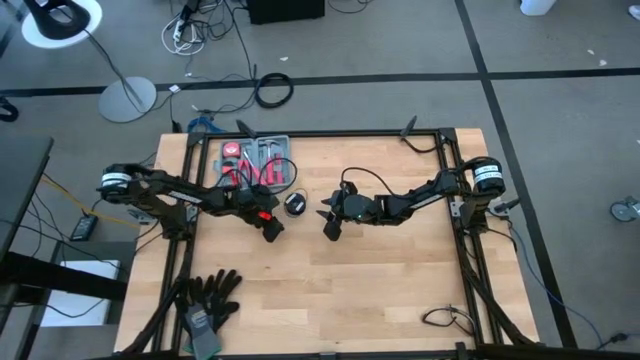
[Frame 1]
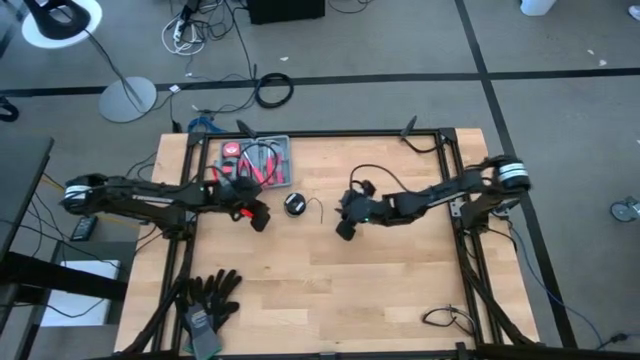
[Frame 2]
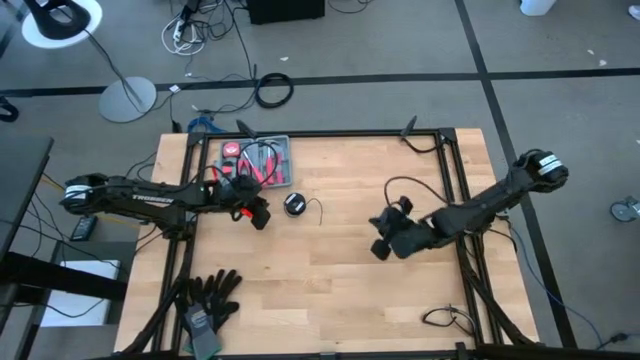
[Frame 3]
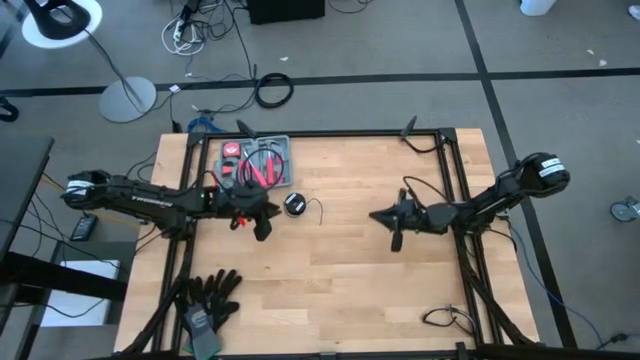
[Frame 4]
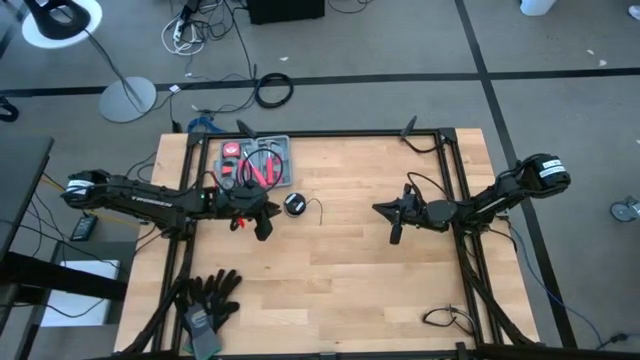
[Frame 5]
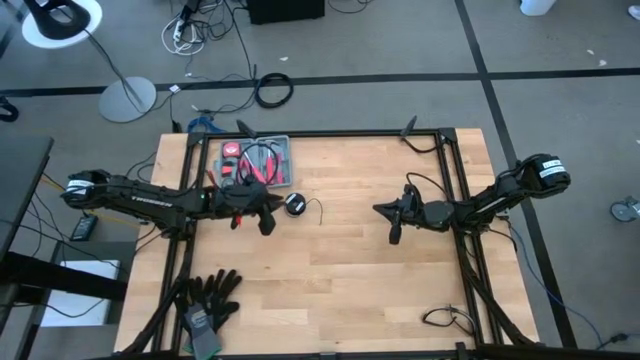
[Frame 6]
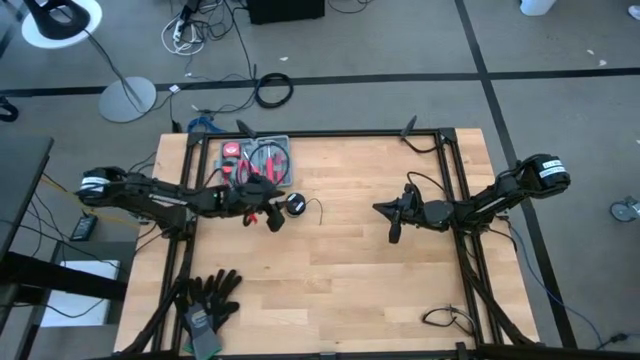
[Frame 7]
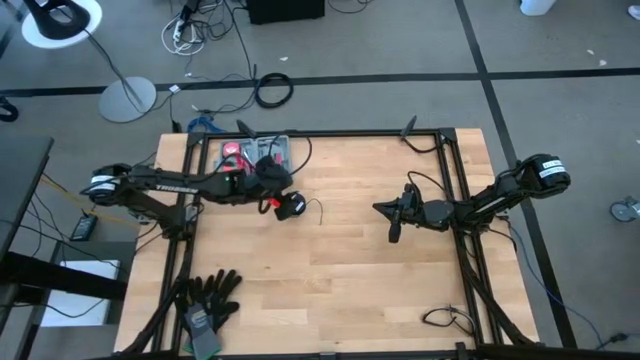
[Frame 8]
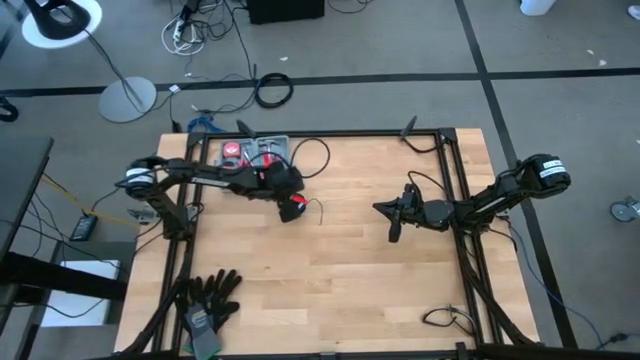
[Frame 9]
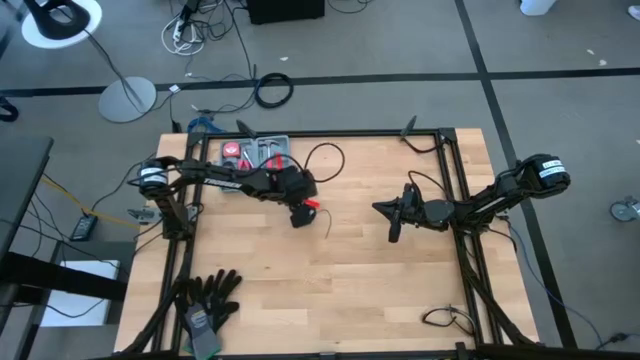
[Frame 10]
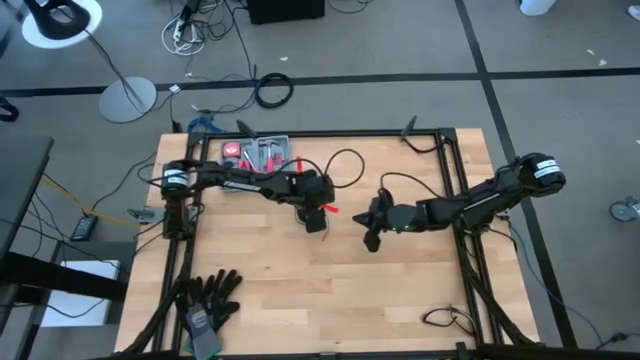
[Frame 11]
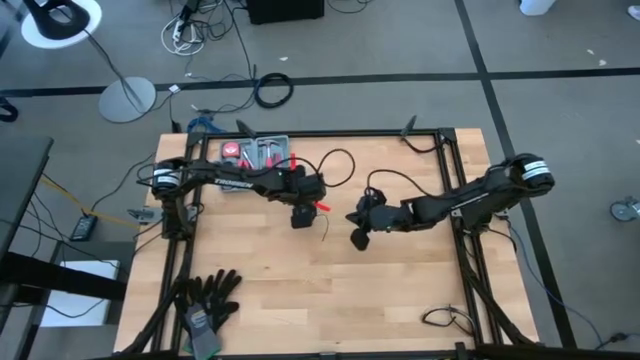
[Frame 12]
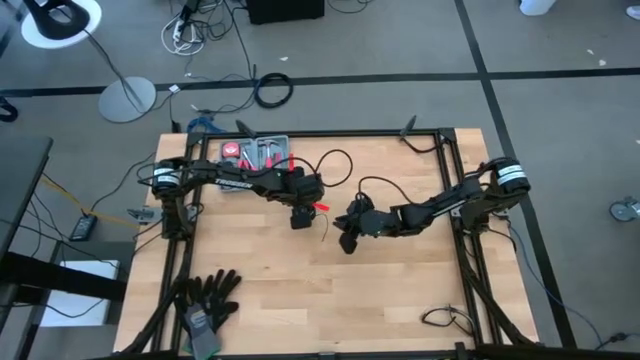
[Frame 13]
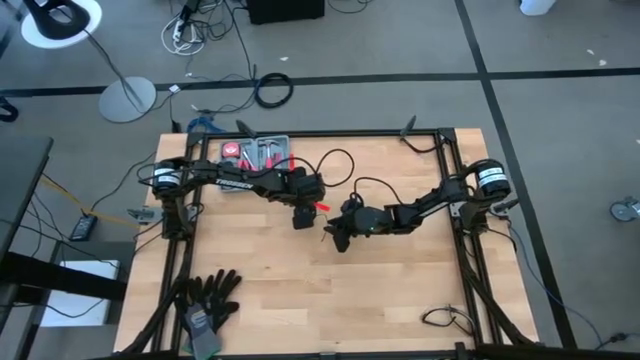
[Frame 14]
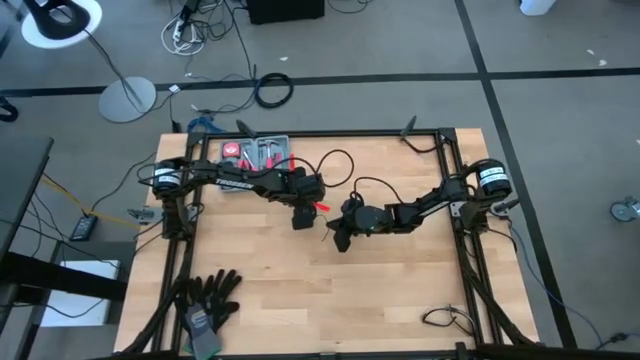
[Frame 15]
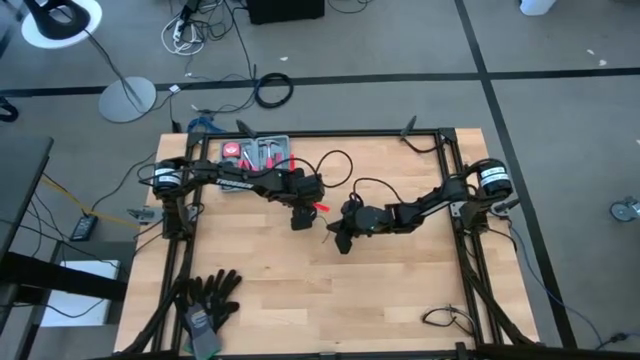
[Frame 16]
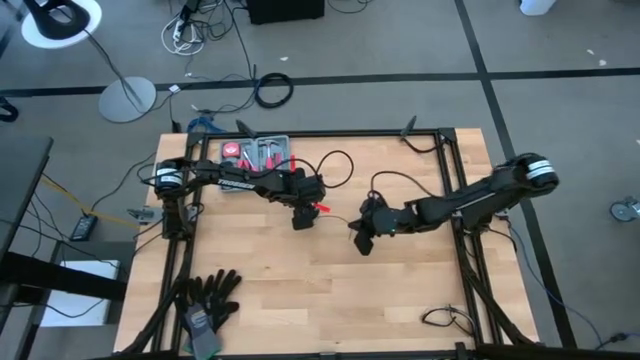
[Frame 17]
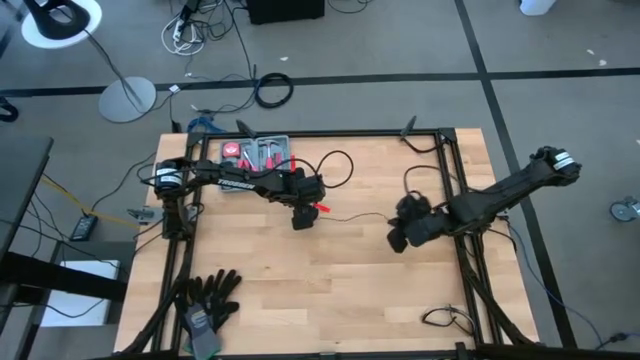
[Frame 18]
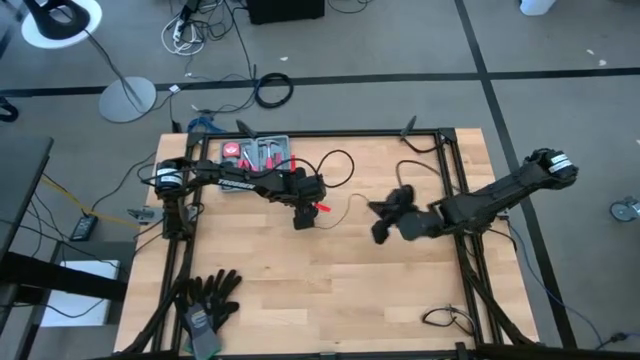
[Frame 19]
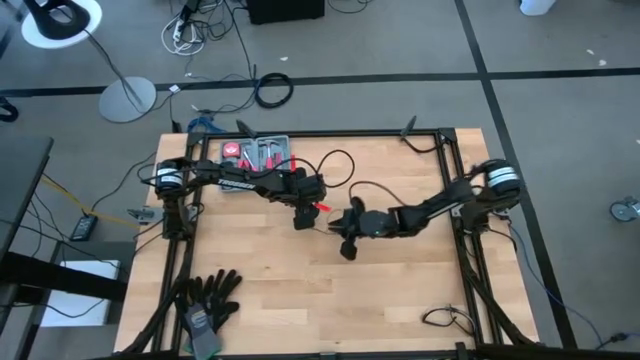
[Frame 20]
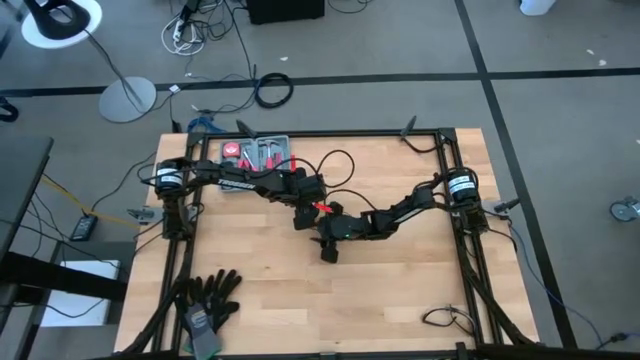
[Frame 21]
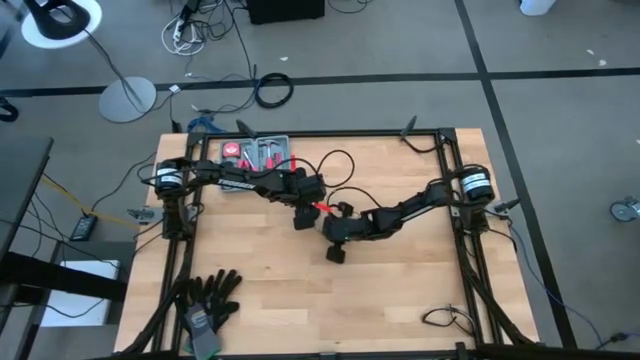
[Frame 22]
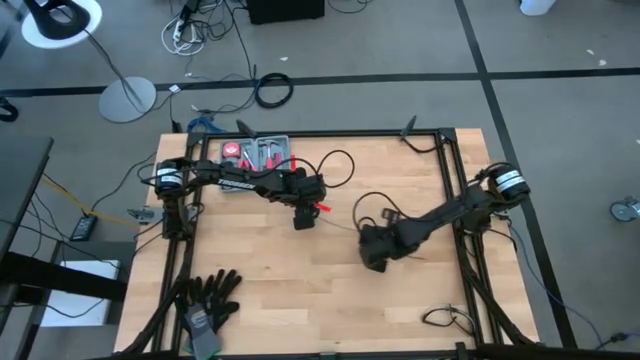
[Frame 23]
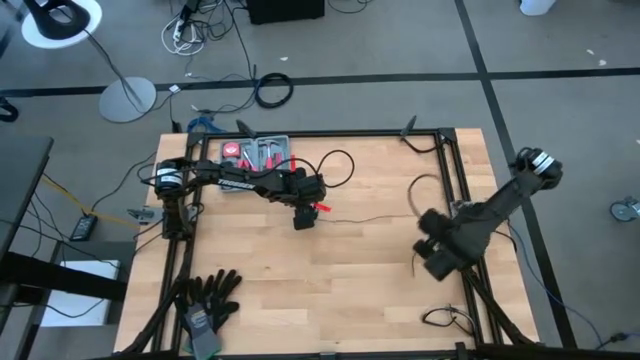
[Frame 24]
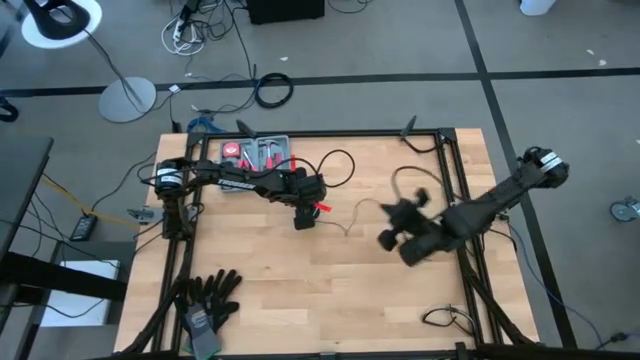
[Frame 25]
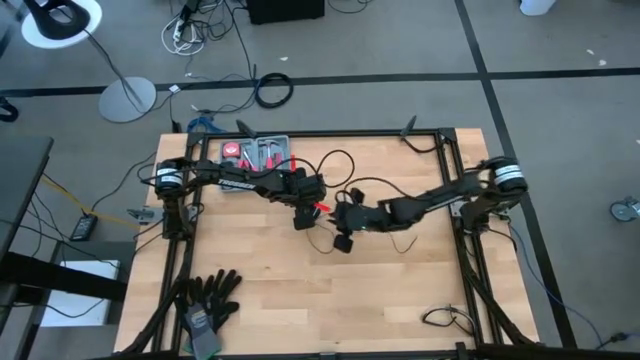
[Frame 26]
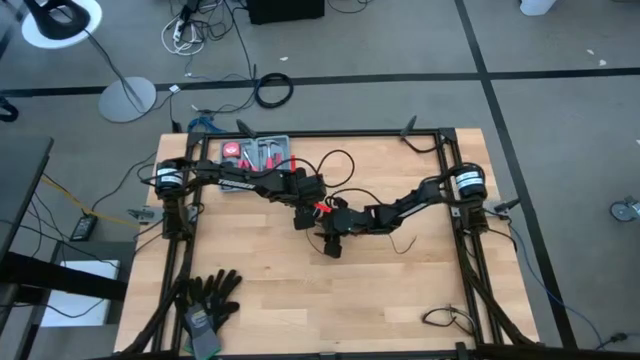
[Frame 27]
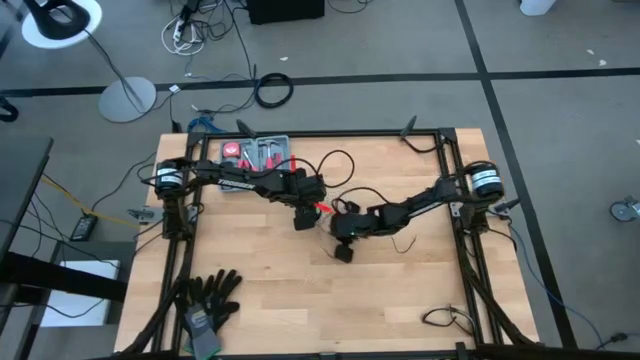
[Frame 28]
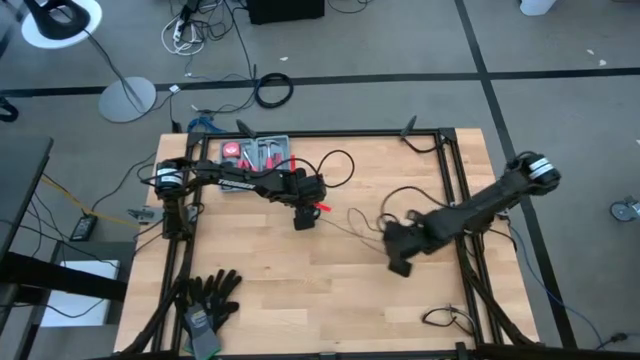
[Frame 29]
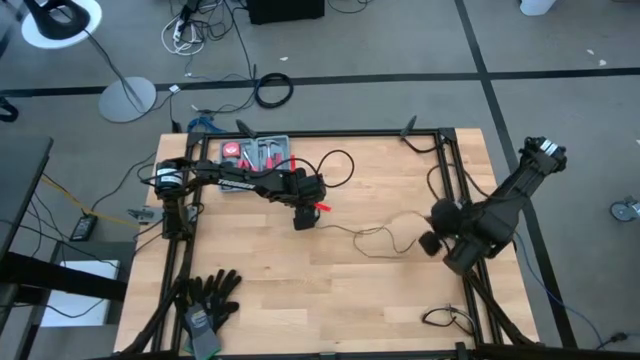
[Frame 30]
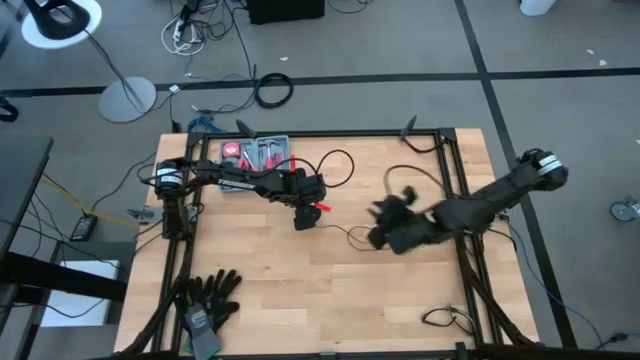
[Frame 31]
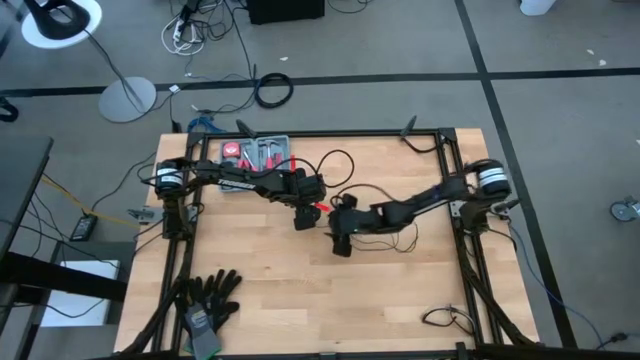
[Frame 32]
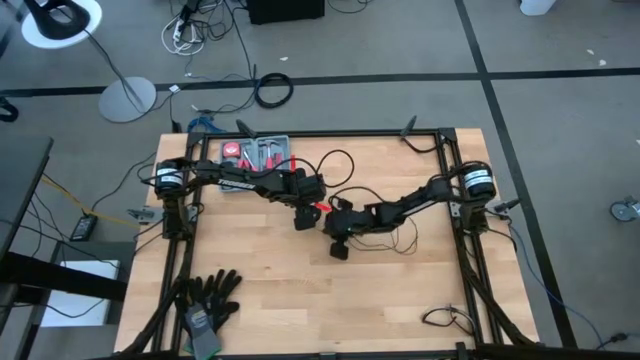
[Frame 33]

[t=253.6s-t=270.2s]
Task: Coil cords
Uncoil the black cable wire from the spool

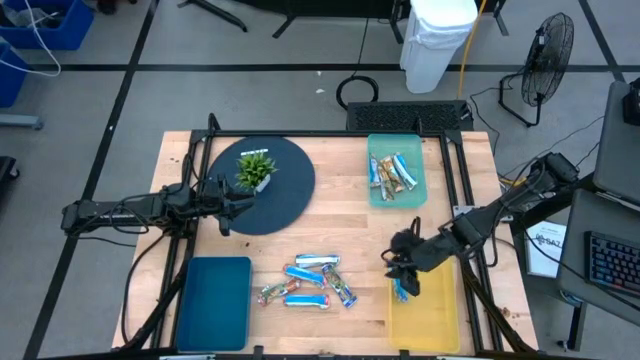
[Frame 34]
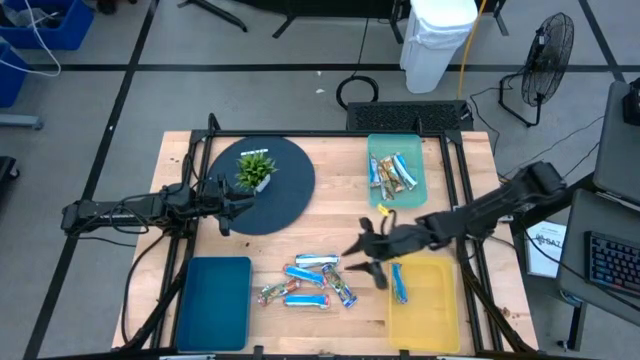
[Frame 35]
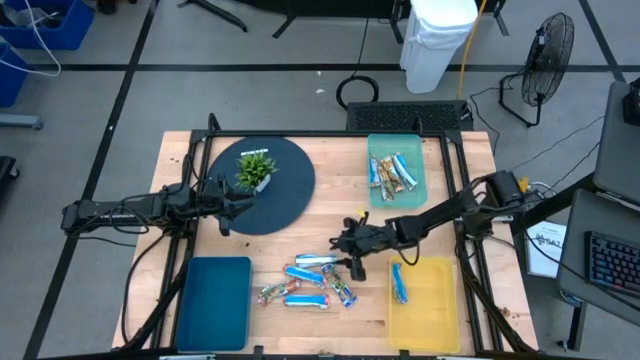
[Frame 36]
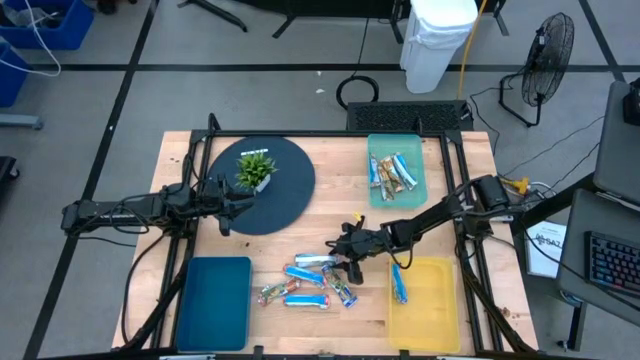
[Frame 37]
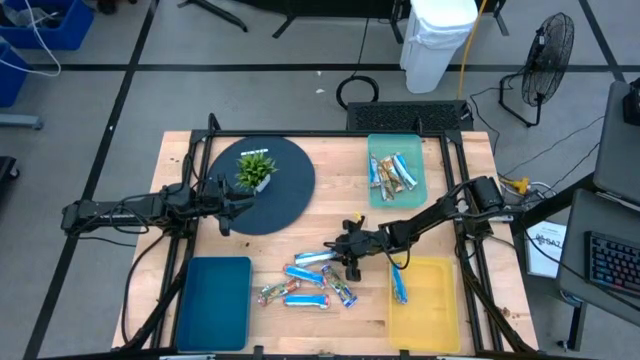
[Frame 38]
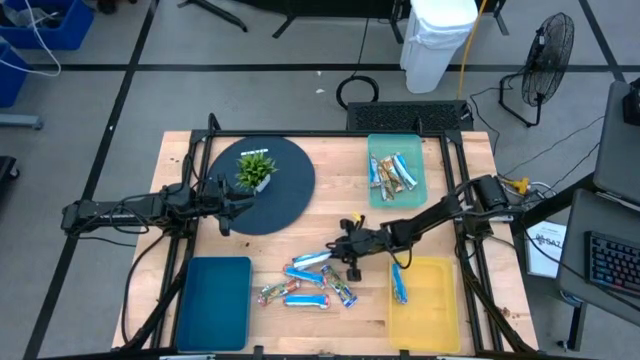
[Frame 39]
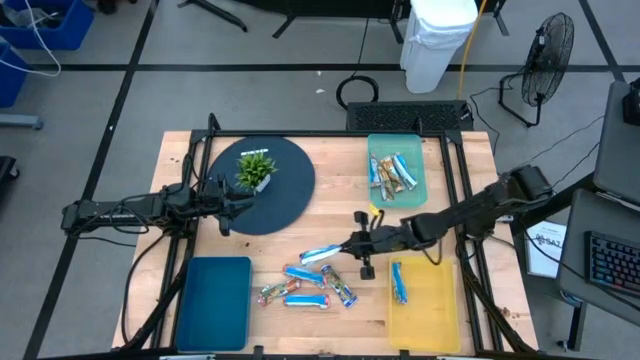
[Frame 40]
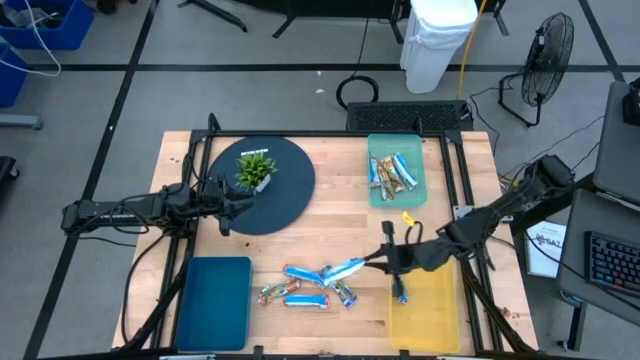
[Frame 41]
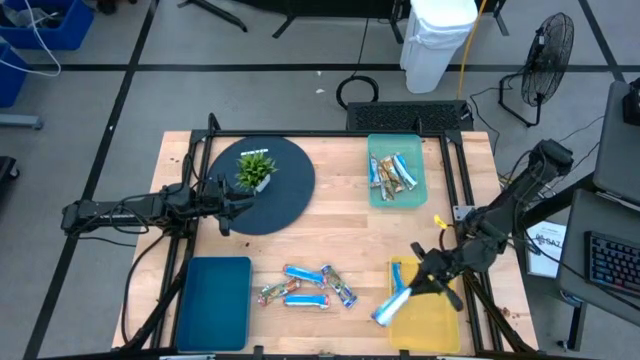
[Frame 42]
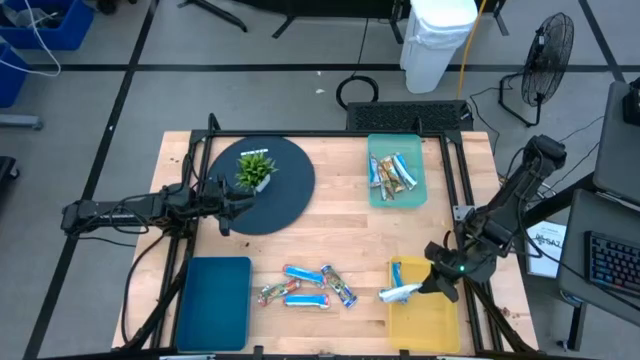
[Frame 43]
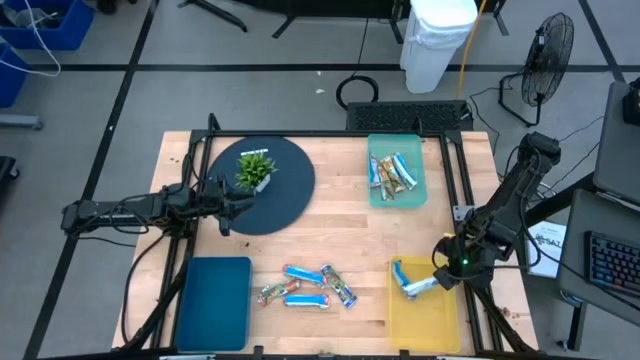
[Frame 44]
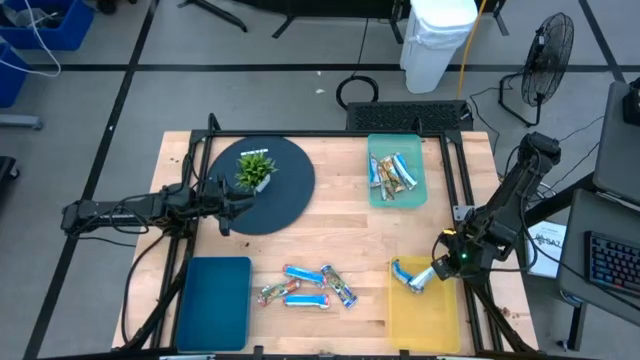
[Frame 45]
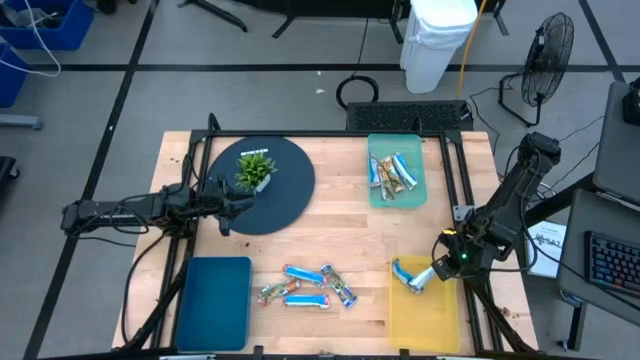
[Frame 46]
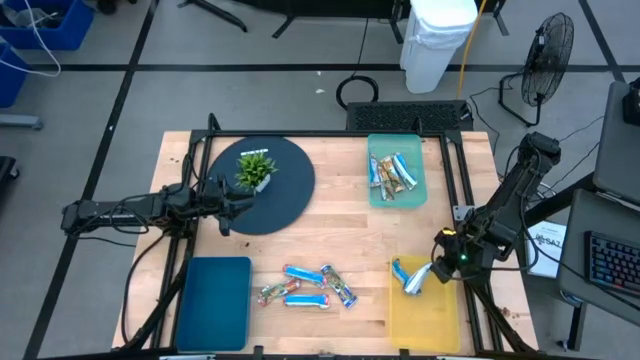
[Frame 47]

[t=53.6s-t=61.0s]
Task: Pick and place Granola Bars by type
Put the blue granola bar into the yellow bin
